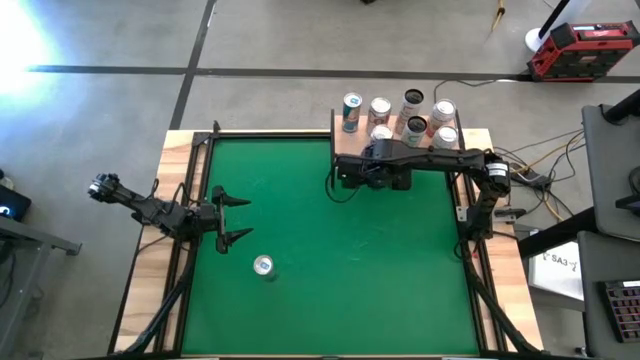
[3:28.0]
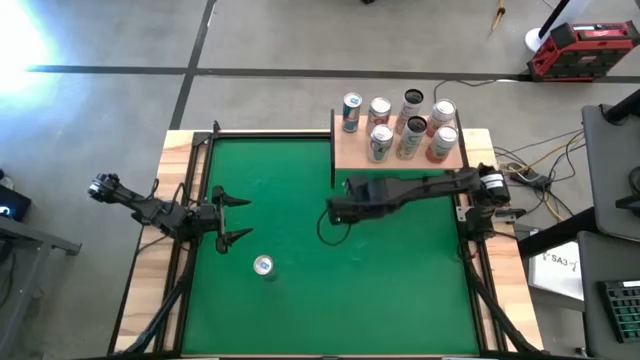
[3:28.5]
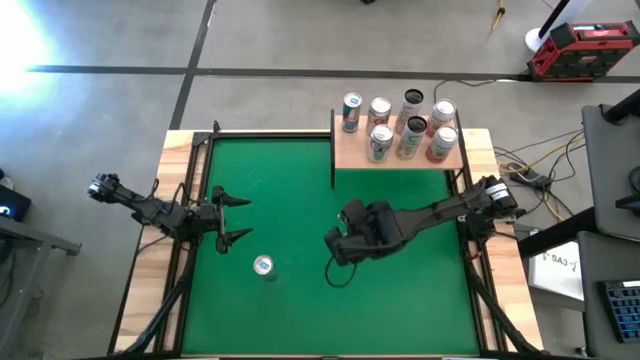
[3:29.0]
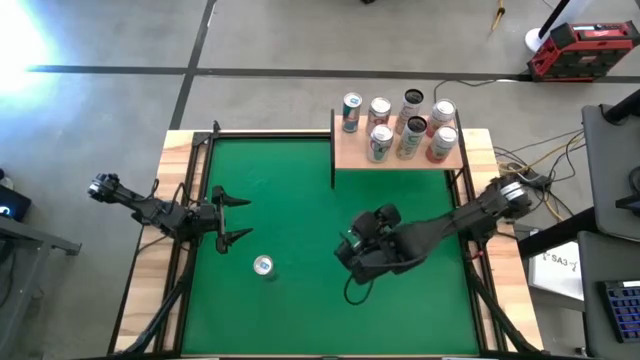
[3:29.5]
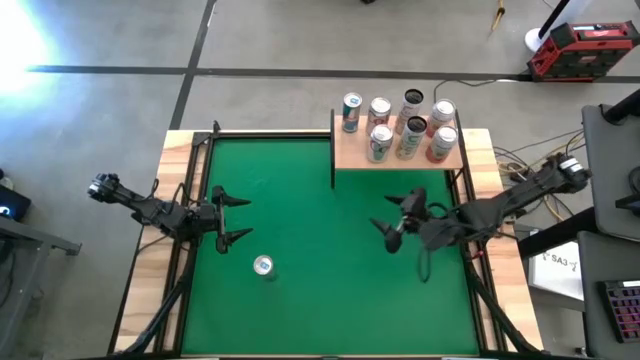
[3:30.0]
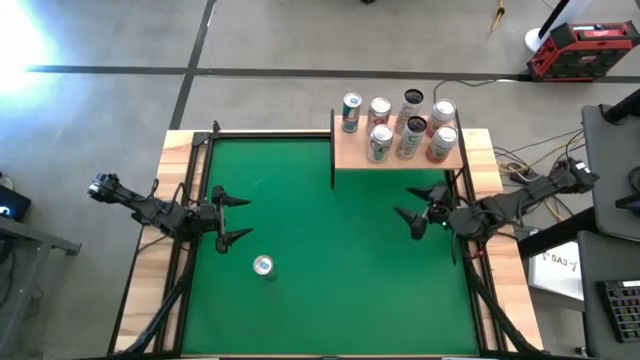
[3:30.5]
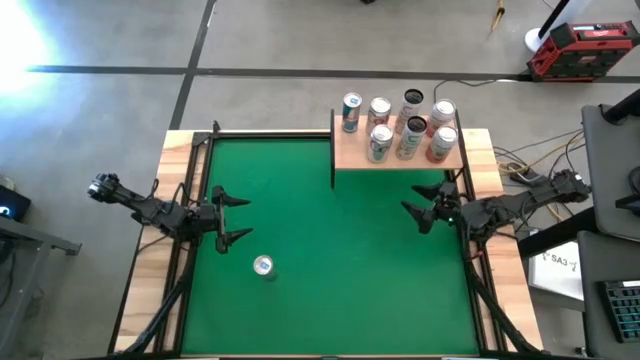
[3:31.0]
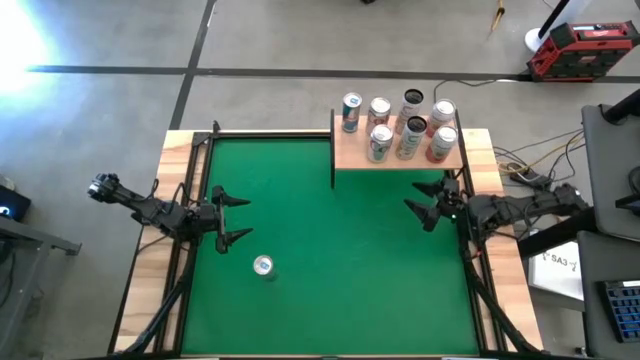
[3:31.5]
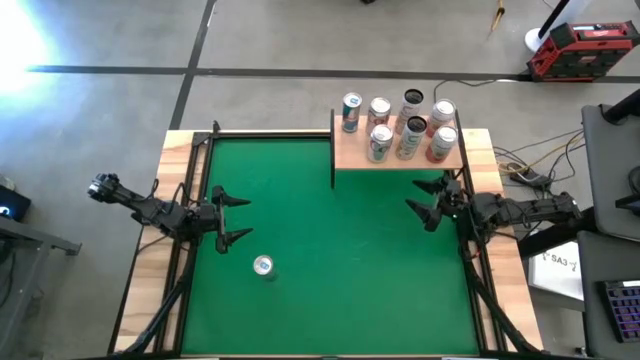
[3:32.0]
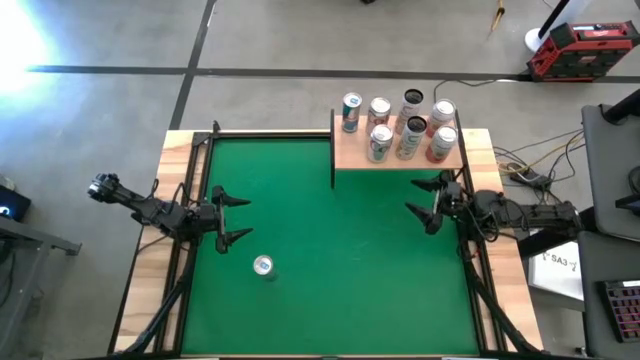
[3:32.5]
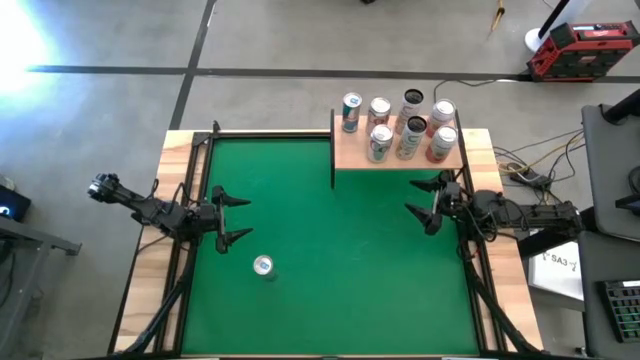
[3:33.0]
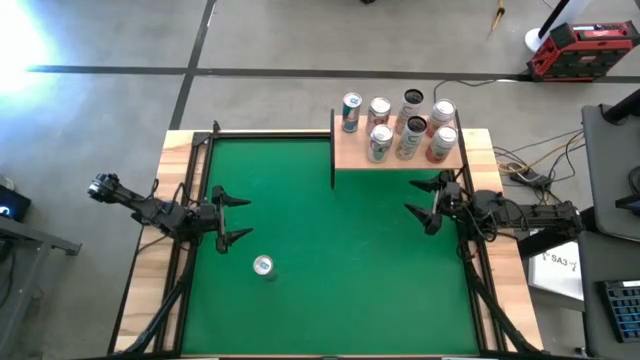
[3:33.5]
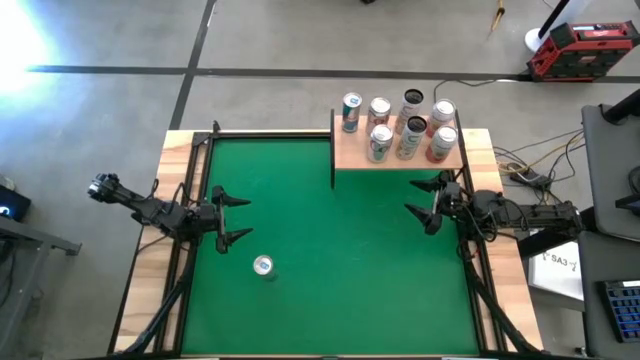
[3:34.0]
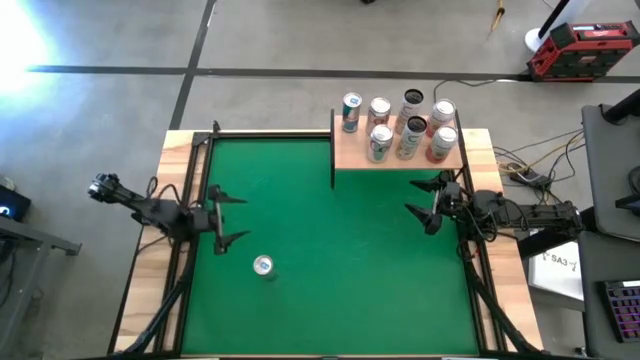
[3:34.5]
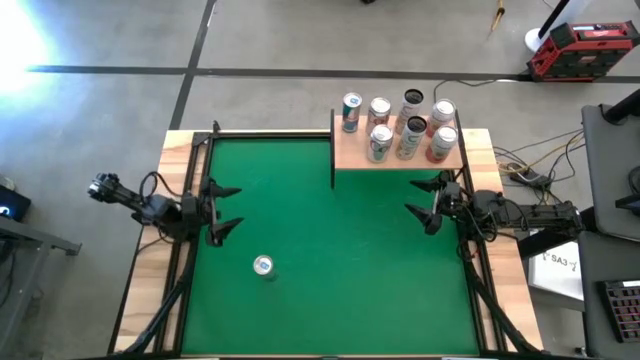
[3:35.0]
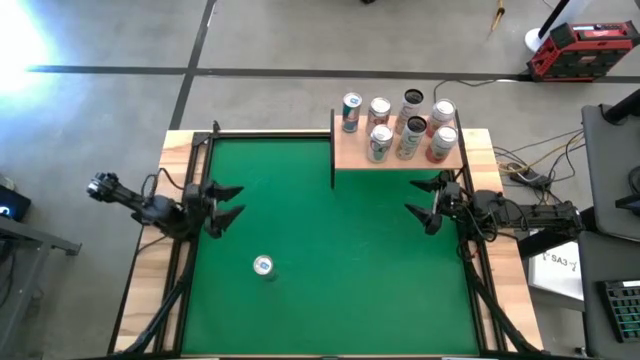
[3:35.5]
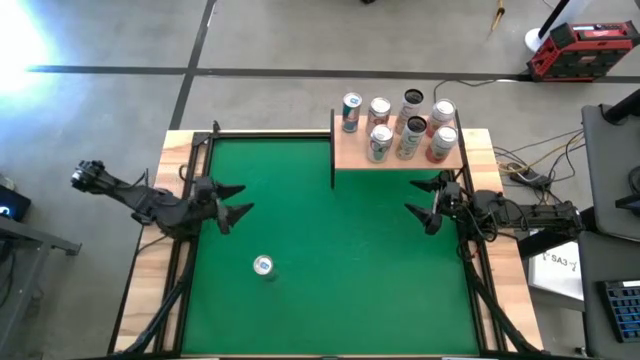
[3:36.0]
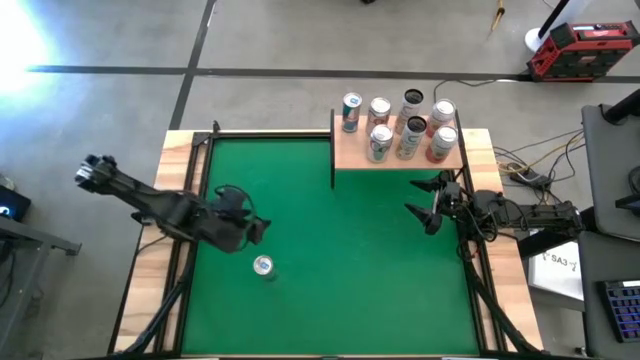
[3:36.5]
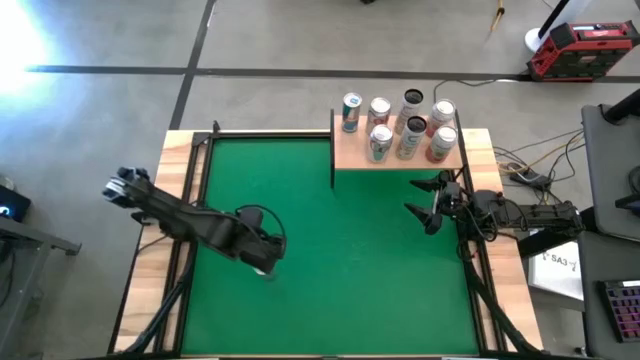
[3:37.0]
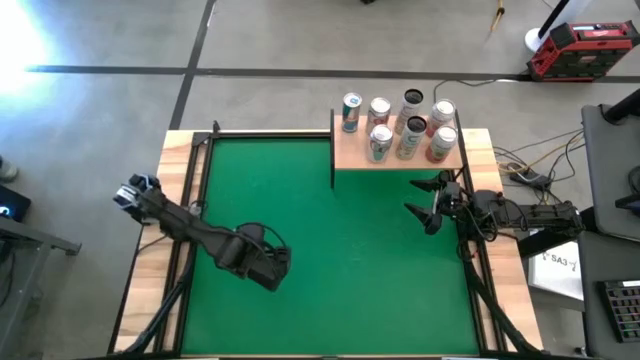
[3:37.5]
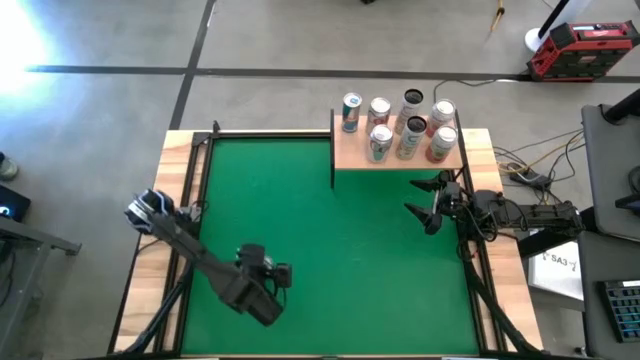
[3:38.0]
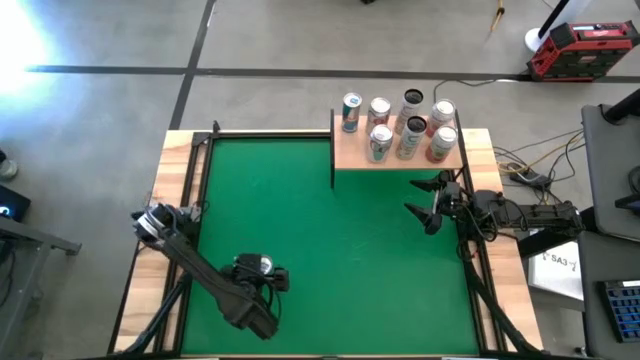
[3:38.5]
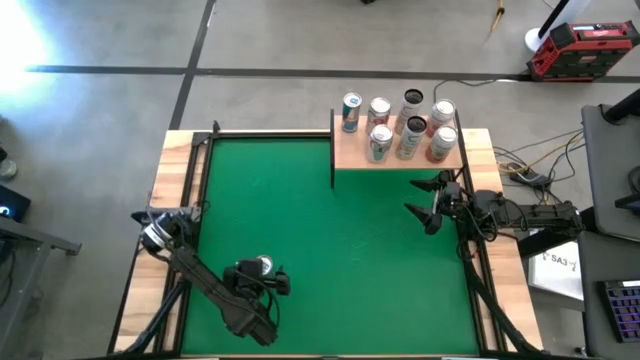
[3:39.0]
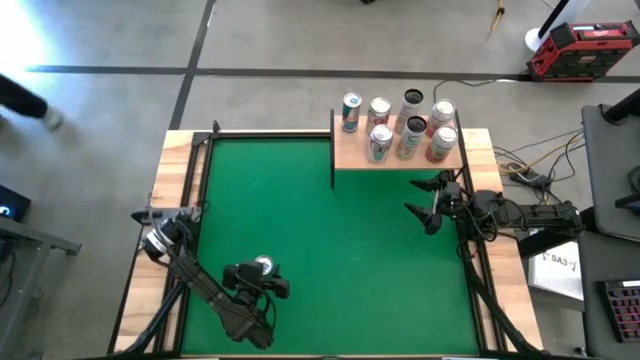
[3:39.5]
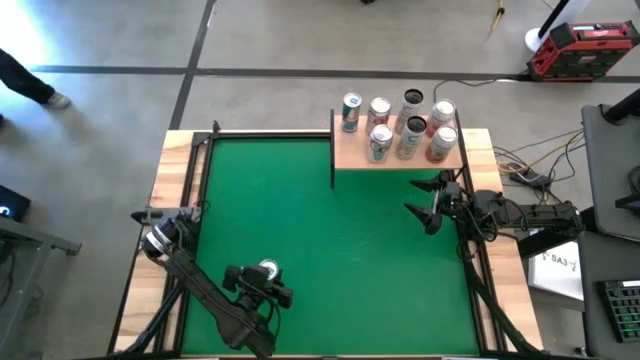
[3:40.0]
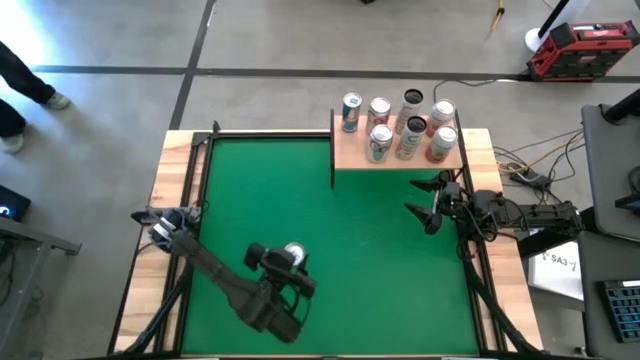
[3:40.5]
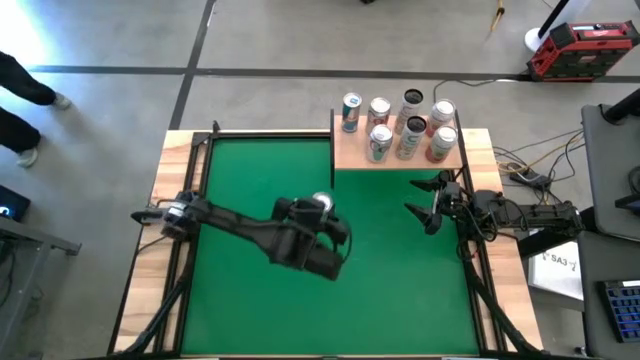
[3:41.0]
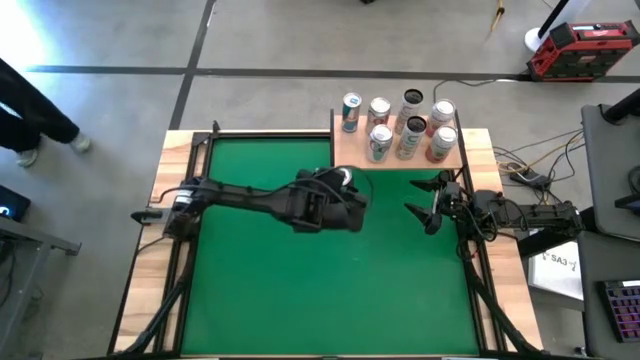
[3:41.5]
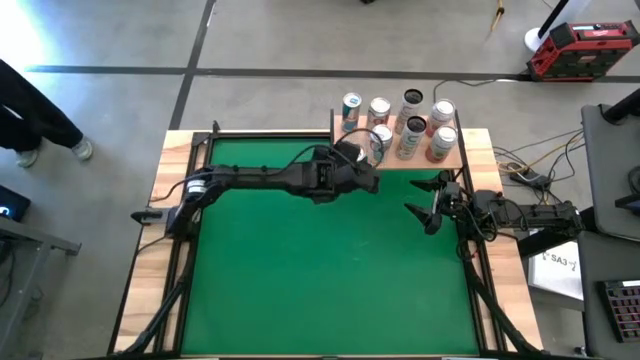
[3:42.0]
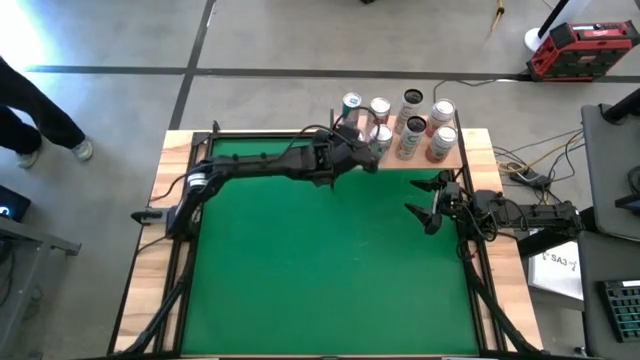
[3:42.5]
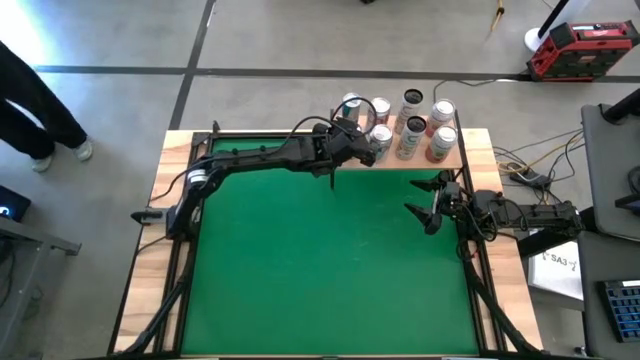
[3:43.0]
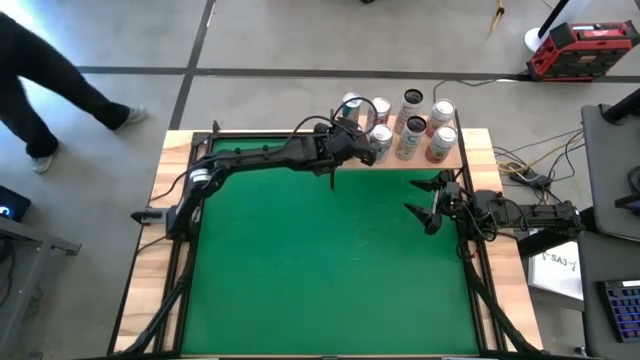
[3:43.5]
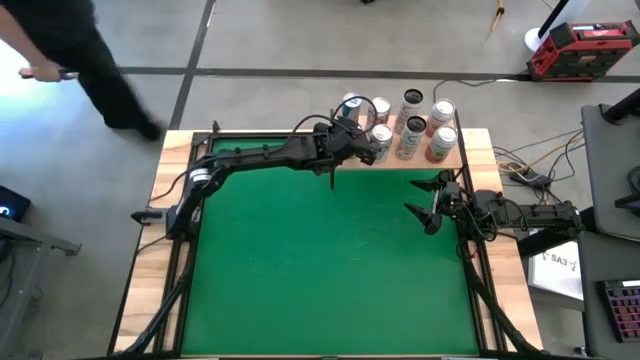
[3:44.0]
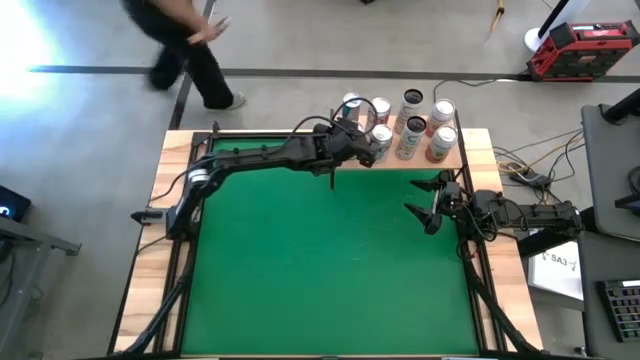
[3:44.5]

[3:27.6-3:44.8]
Task: Place canned beverage on shelf
Put the blue soda can on the shelf aligned with the other blue soda can

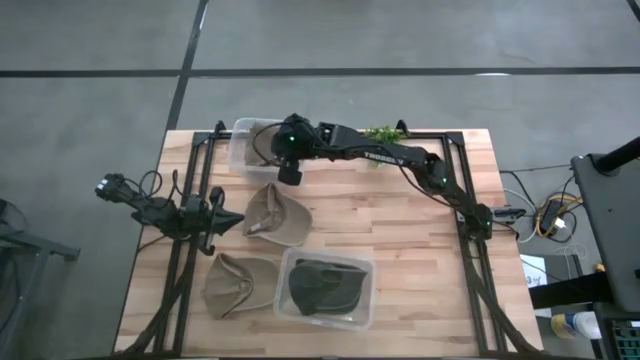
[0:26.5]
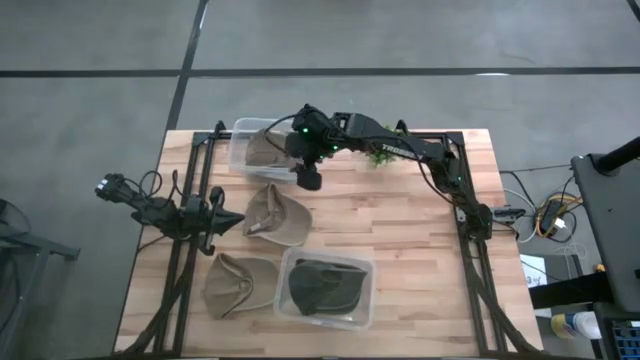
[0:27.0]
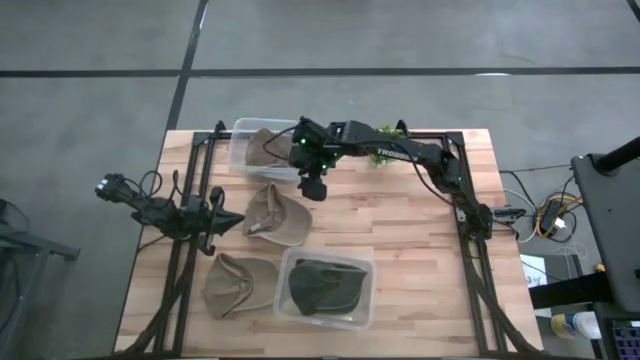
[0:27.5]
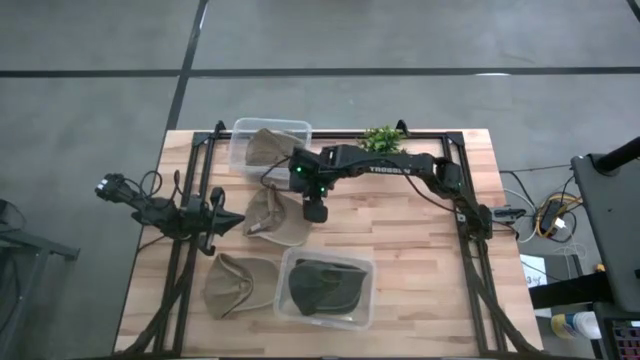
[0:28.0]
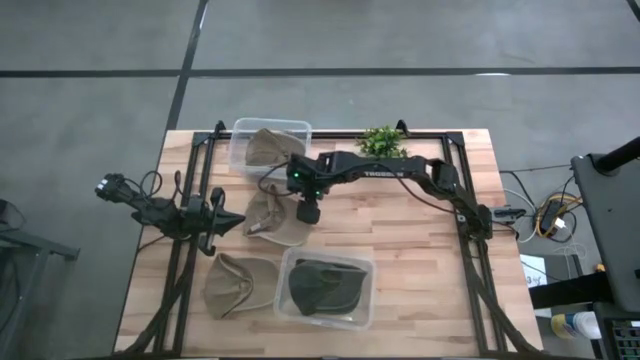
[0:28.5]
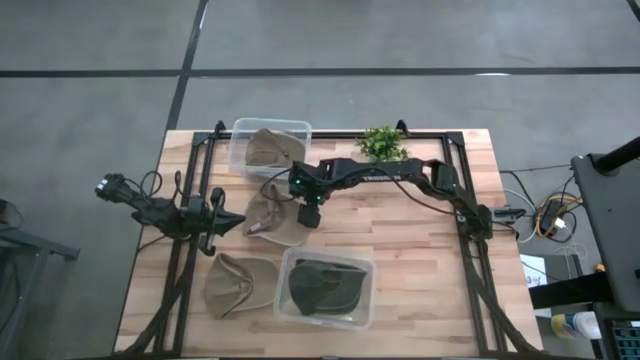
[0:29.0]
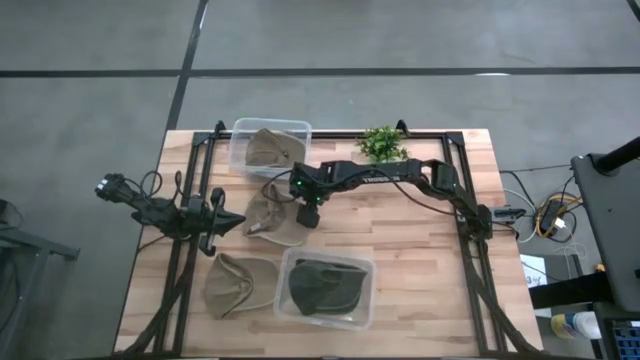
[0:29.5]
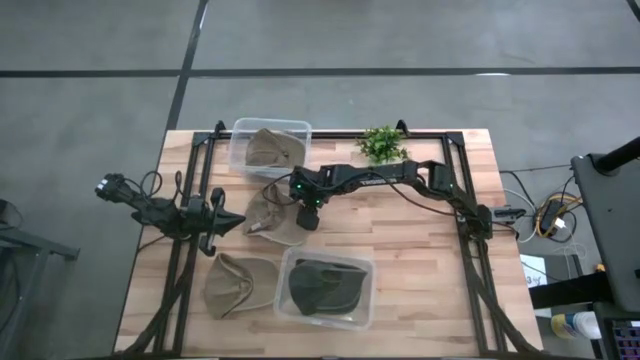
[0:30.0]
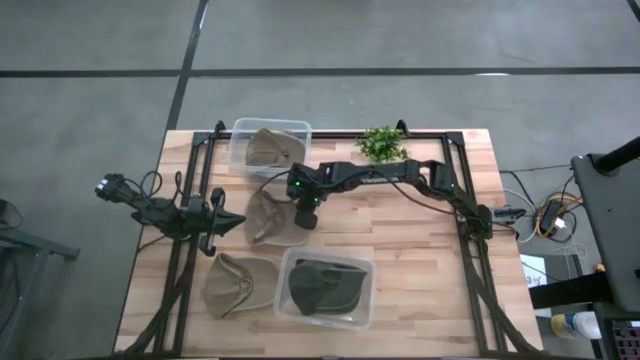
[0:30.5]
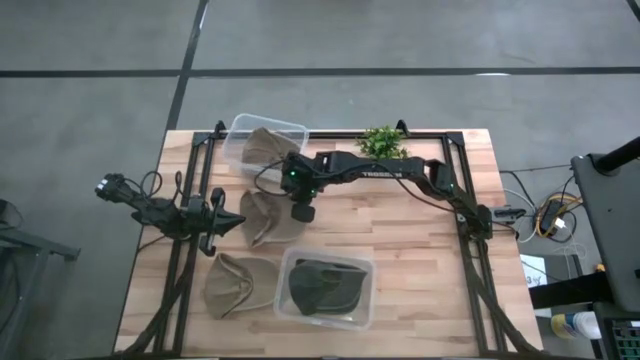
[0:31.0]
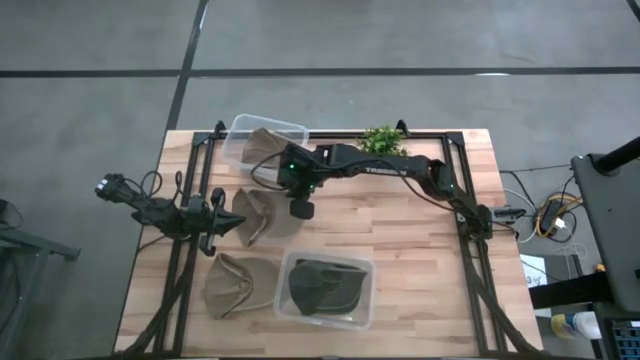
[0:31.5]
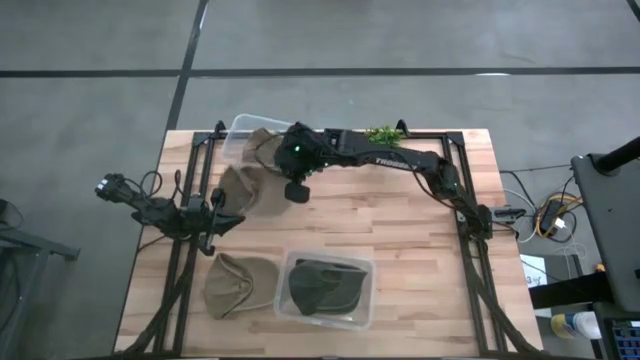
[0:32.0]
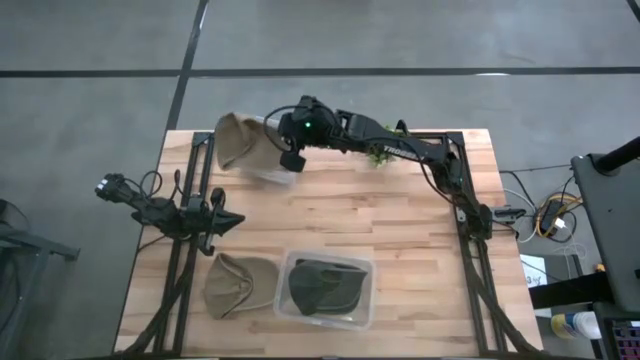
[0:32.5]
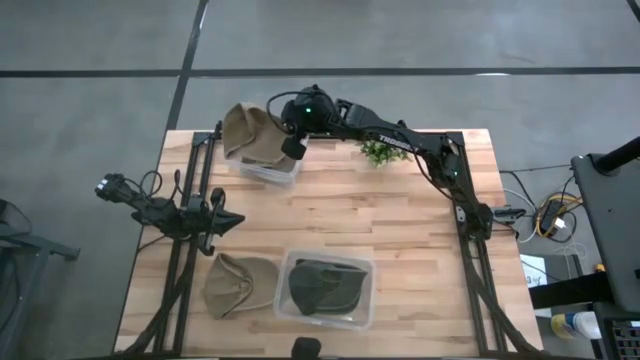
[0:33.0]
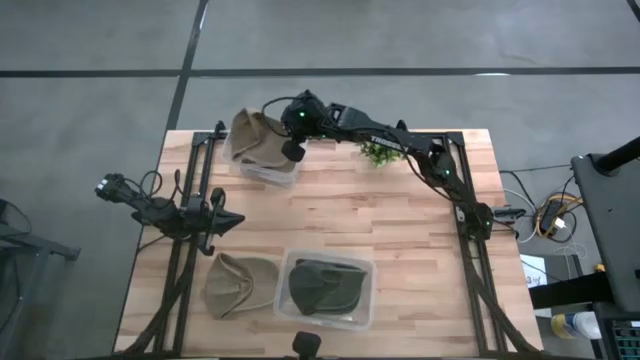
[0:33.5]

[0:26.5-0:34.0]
Task: Pick & Place hat
Put the top brown cap into the top transparent bin
